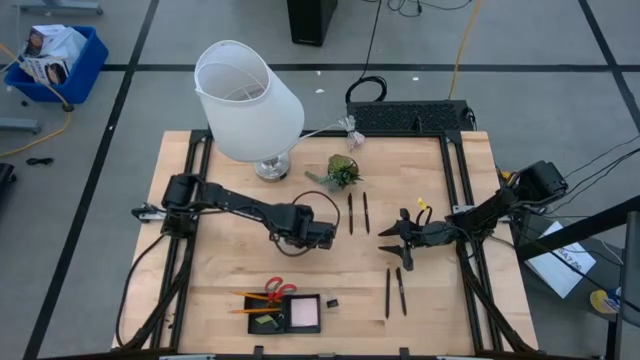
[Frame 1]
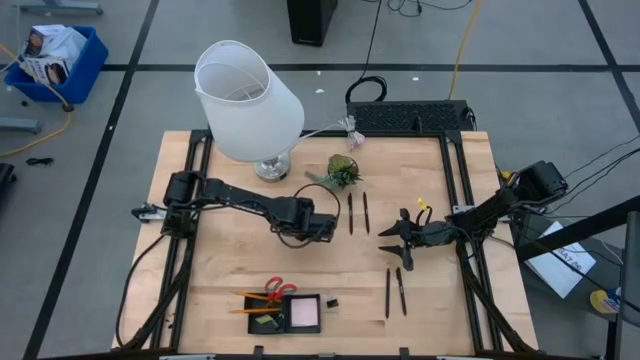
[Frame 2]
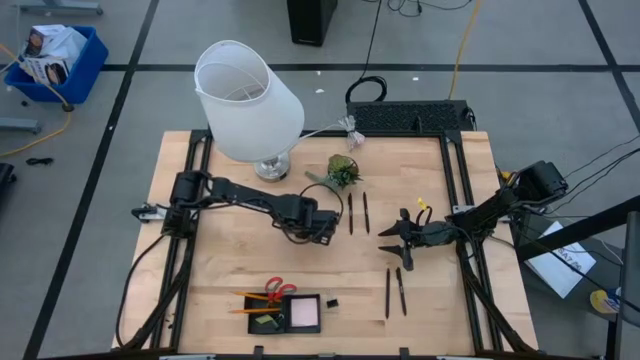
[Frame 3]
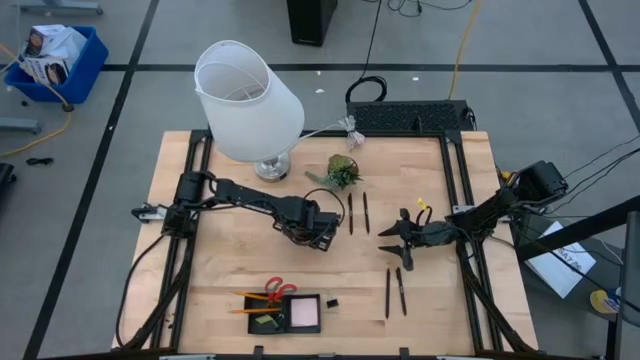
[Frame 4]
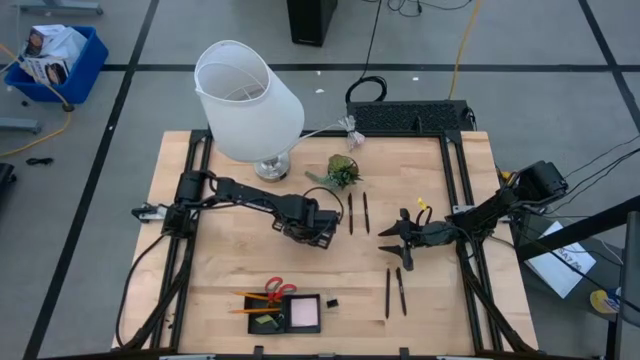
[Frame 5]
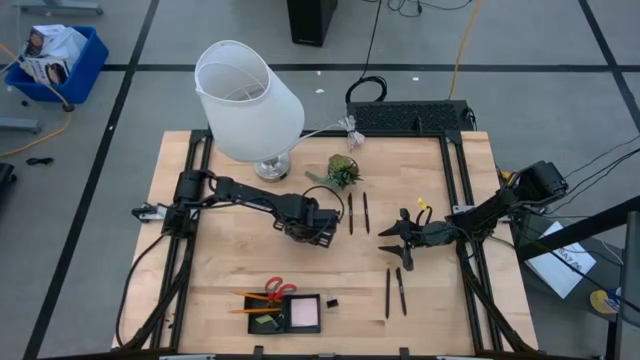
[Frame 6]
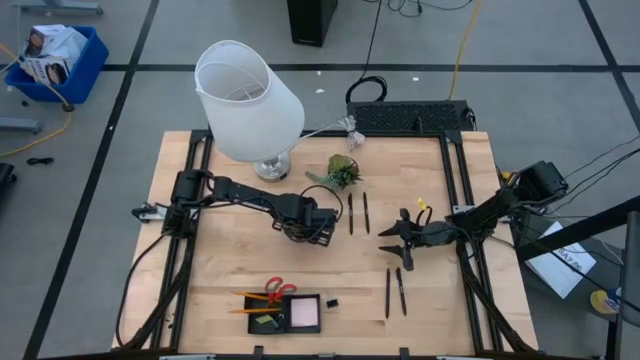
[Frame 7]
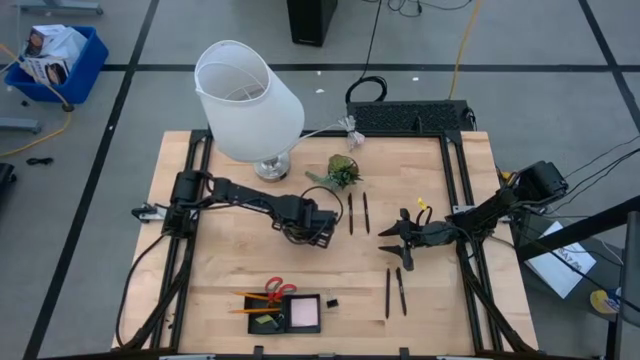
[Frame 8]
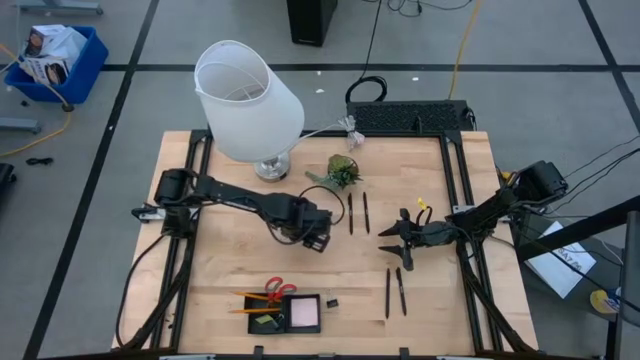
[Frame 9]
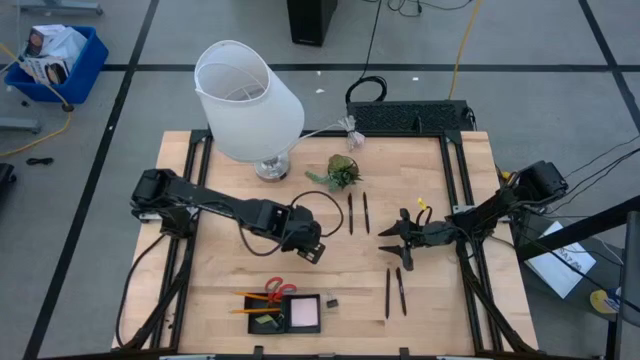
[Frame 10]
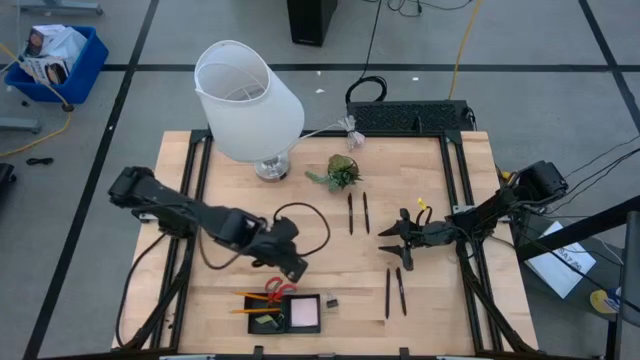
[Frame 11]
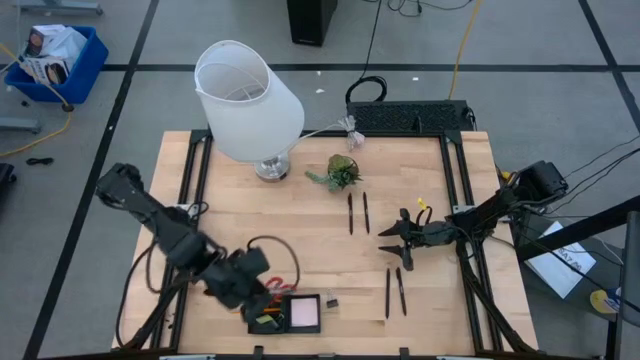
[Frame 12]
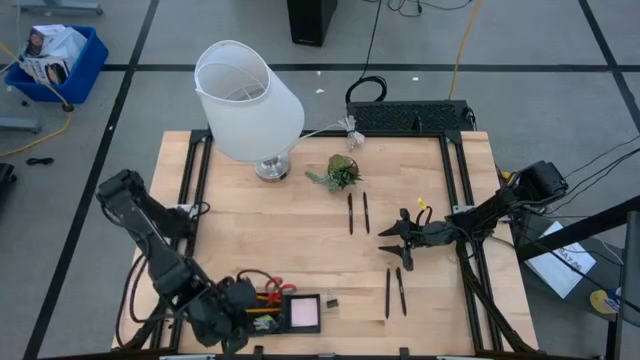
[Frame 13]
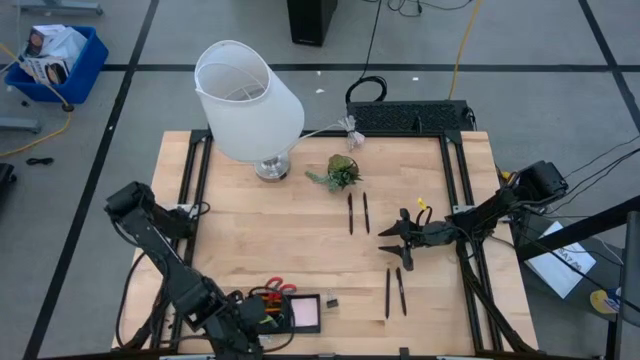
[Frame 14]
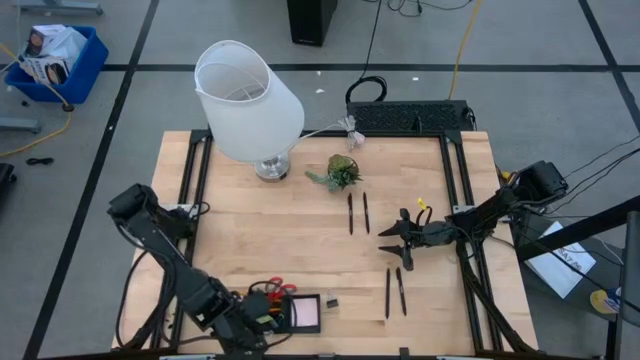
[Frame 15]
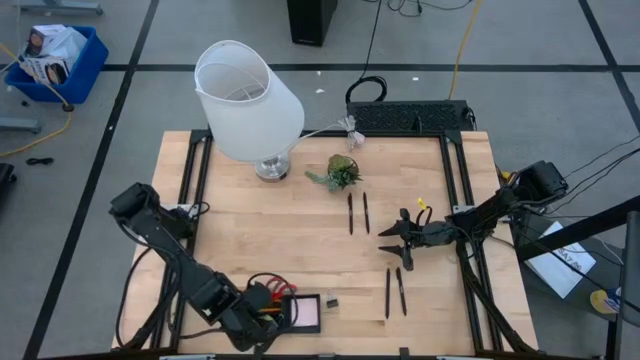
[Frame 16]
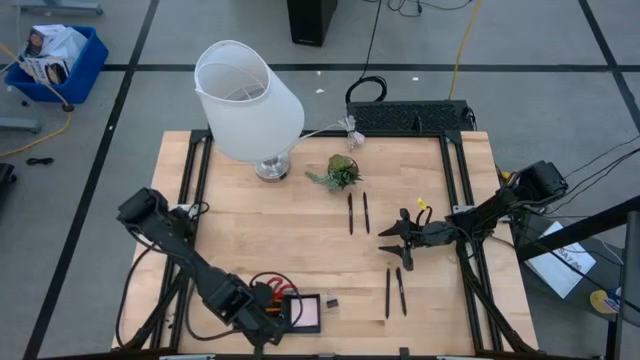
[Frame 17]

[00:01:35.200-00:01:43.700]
Task: Pick and place office supplies into organizer
Put the top black binder clip into the mesh desk organizer

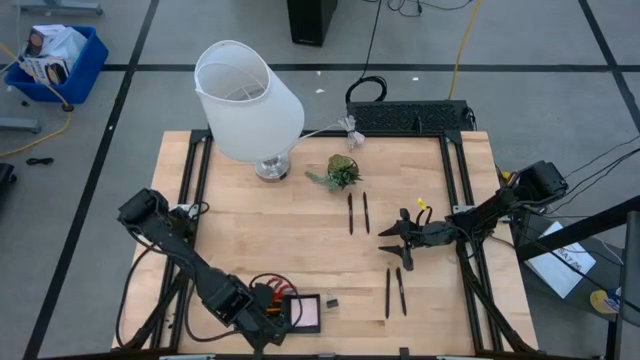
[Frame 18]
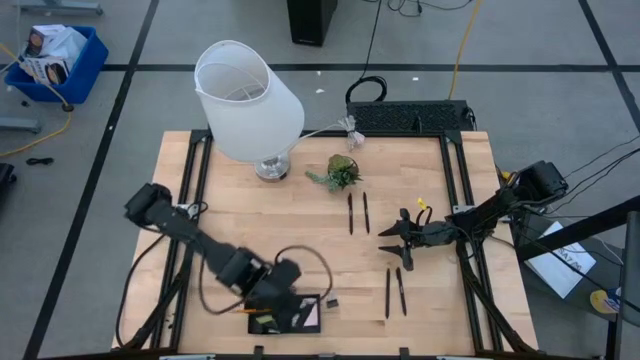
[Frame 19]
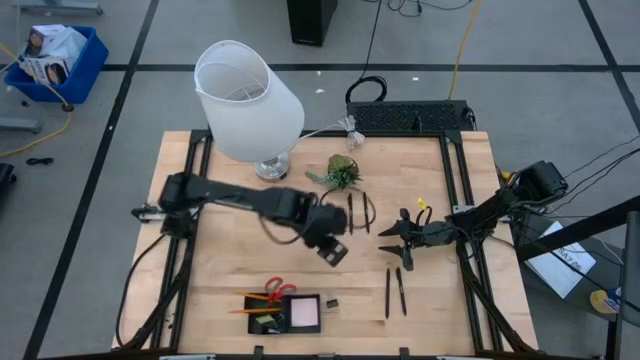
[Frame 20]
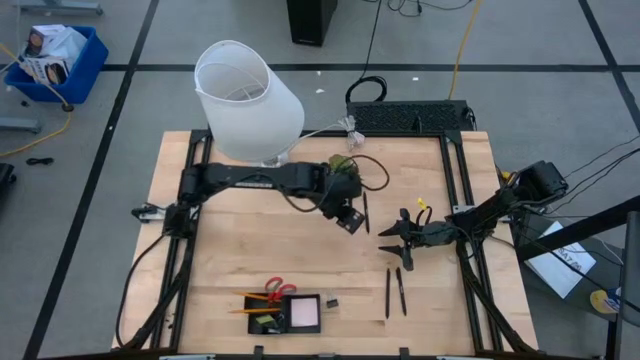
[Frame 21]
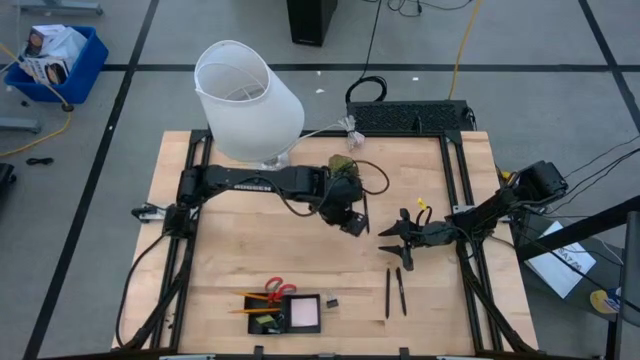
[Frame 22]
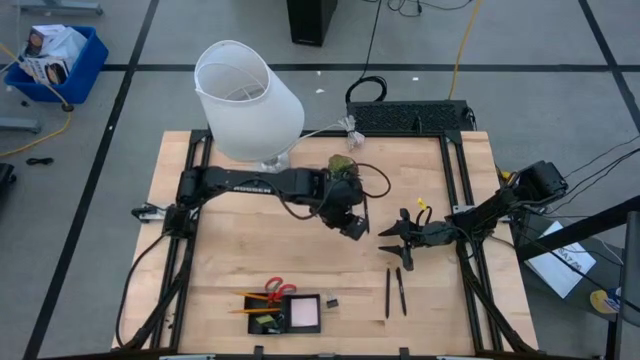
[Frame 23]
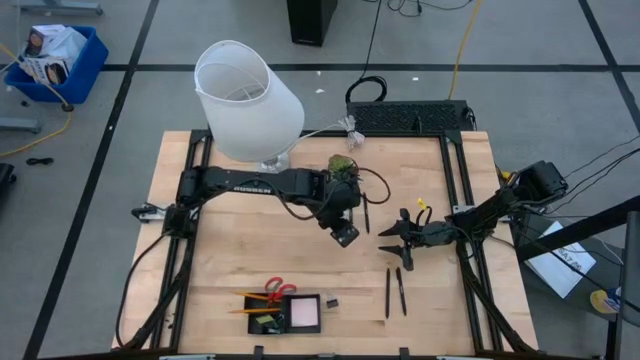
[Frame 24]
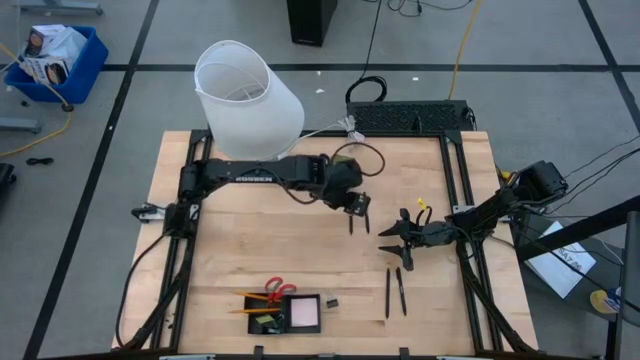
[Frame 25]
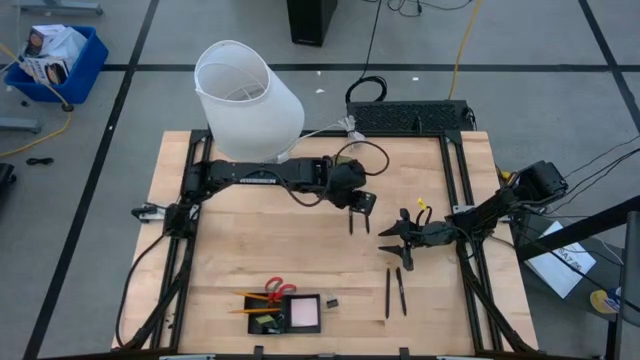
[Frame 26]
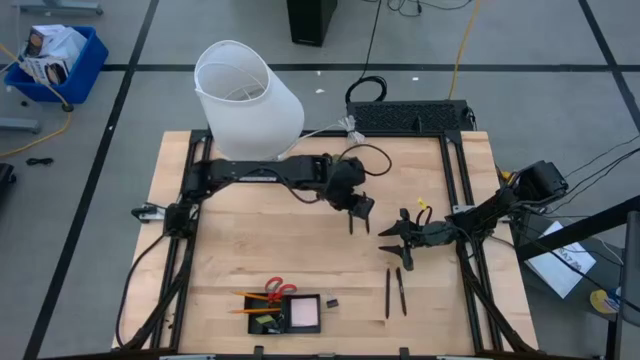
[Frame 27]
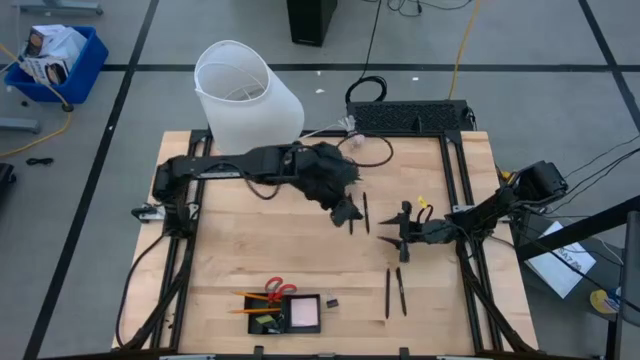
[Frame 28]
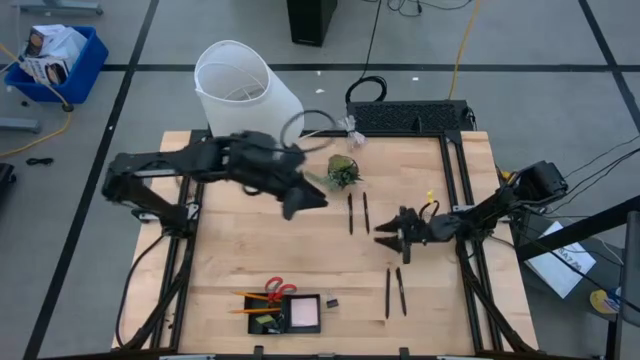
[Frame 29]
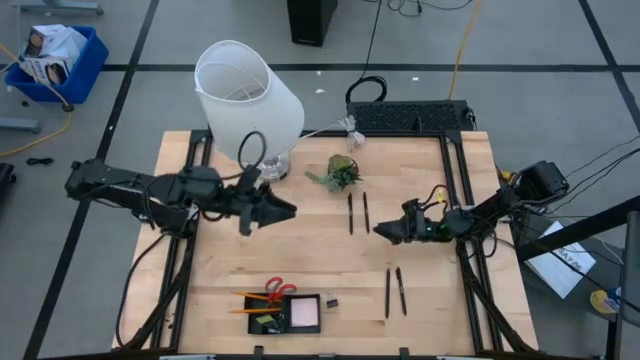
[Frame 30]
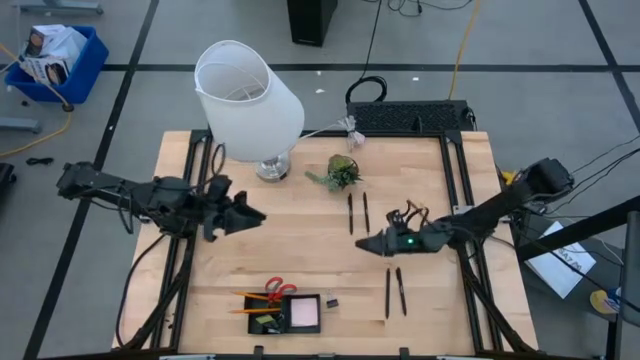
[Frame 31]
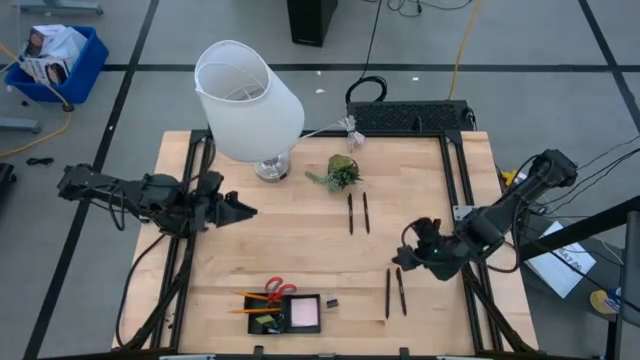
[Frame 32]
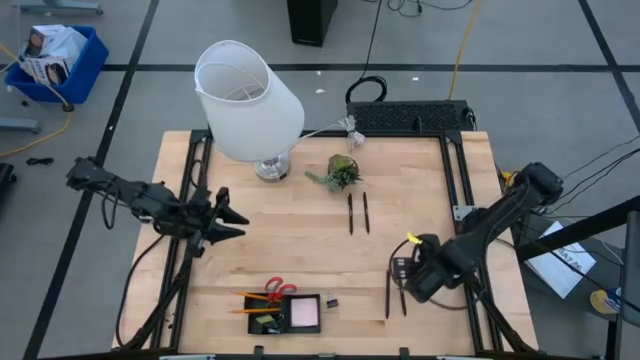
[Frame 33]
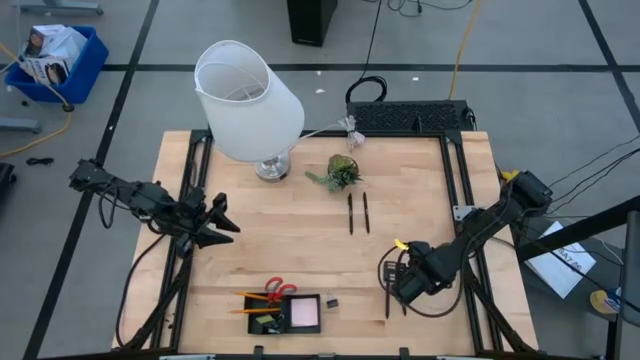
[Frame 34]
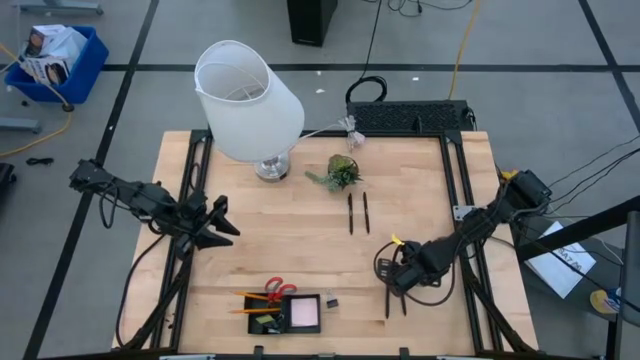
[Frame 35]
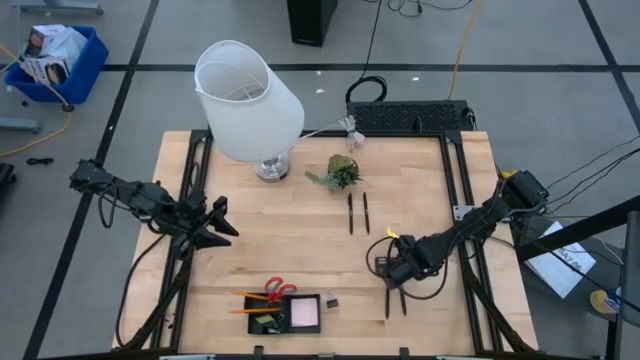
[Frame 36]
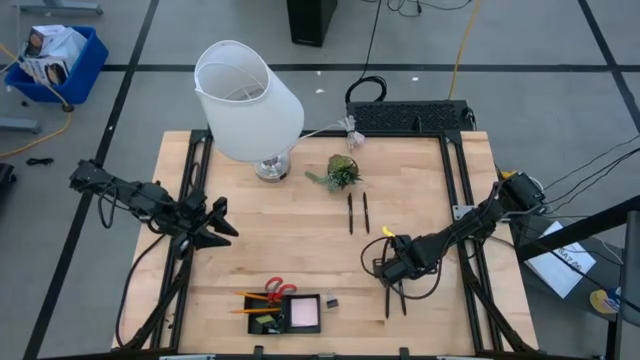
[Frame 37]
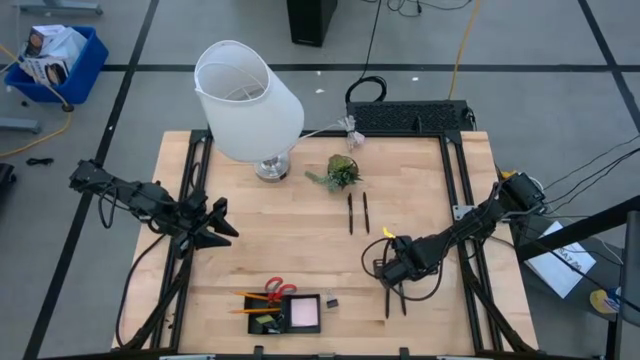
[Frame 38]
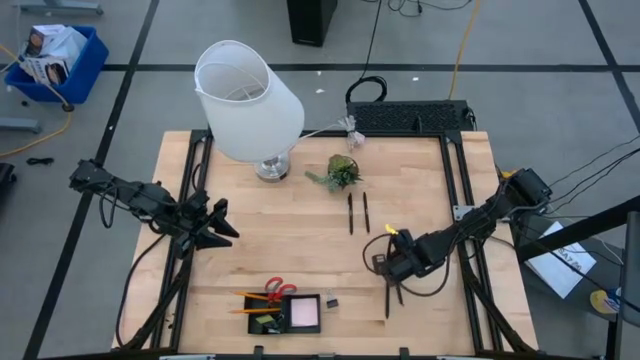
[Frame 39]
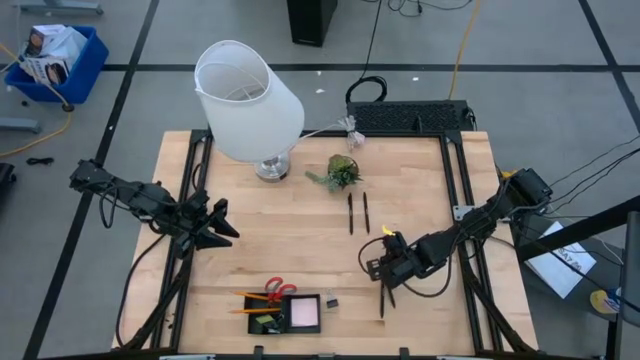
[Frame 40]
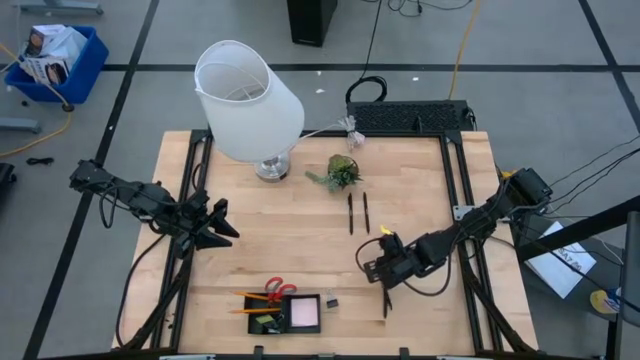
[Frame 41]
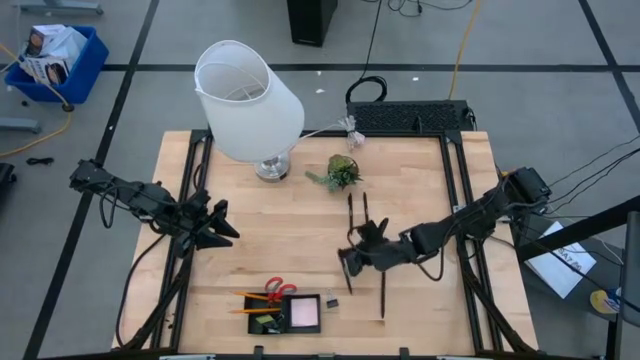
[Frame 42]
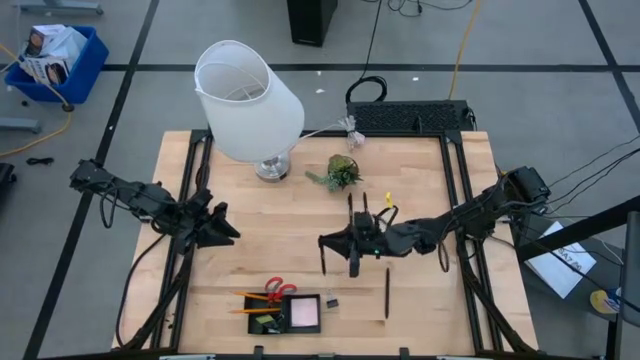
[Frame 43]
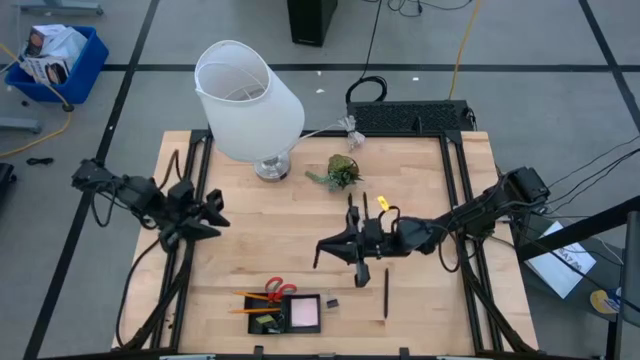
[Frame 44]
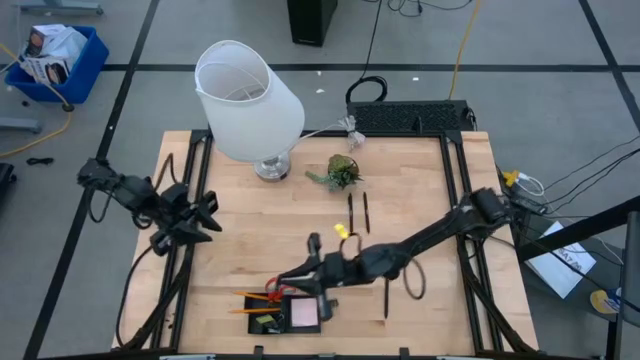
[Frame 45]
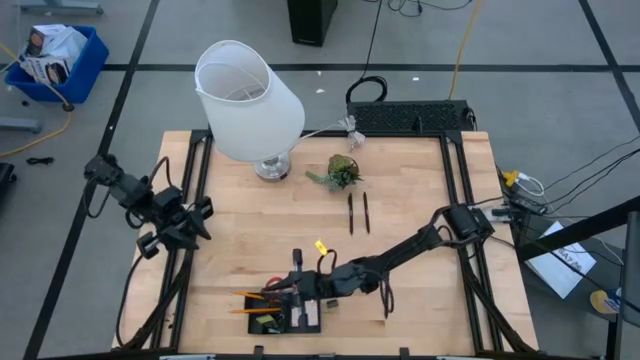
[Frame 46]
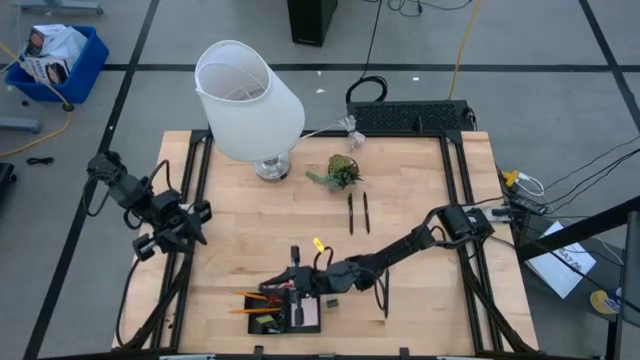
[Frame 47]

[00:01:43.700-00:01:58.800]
Put the black pen into the mesh desk organizer
